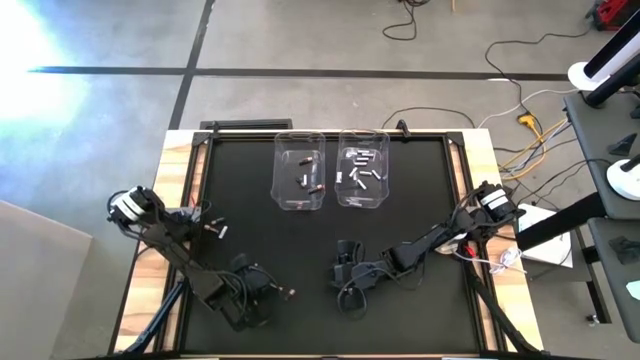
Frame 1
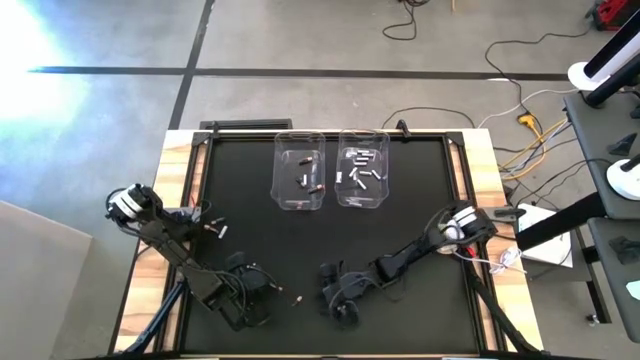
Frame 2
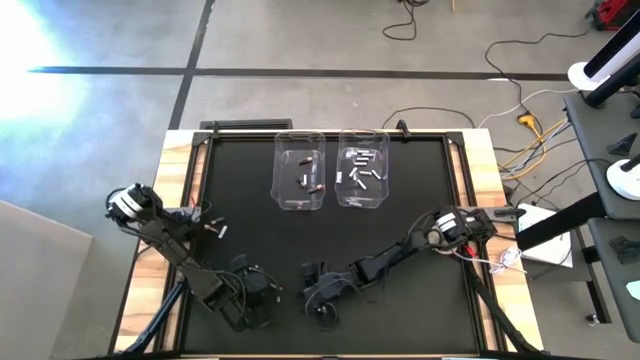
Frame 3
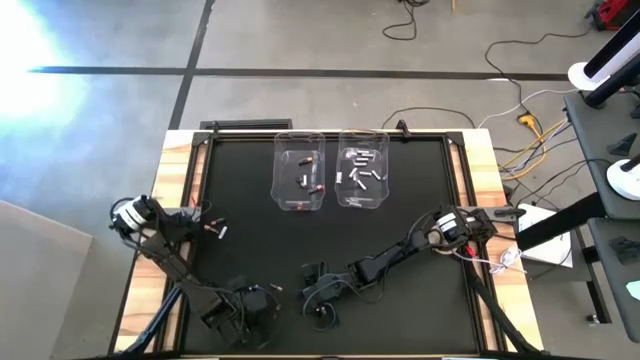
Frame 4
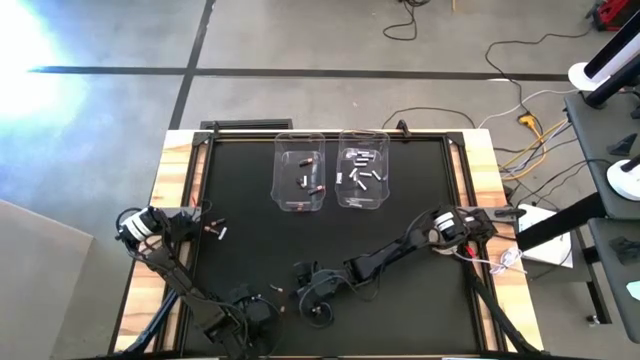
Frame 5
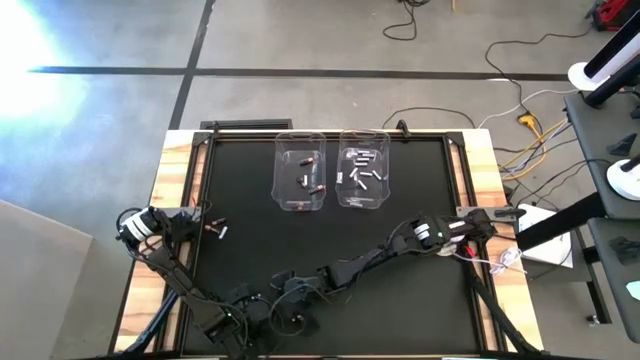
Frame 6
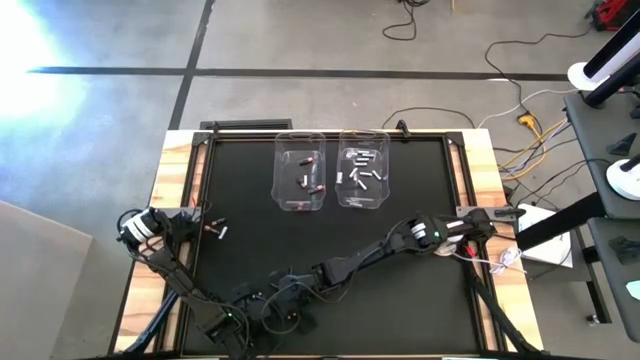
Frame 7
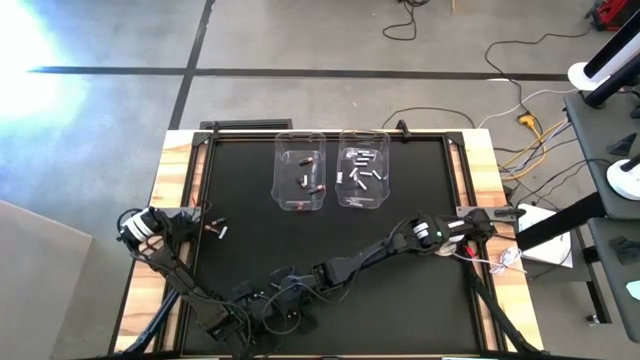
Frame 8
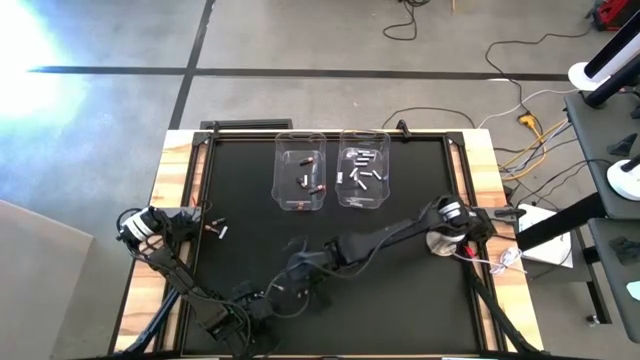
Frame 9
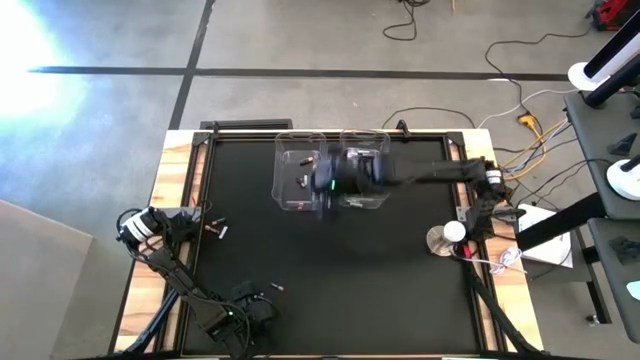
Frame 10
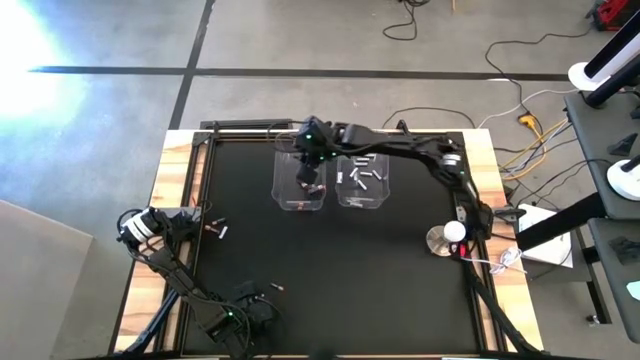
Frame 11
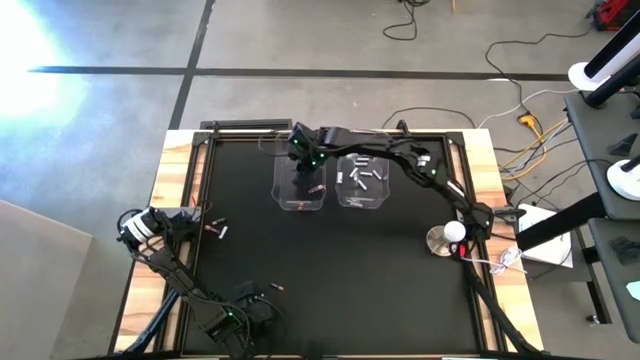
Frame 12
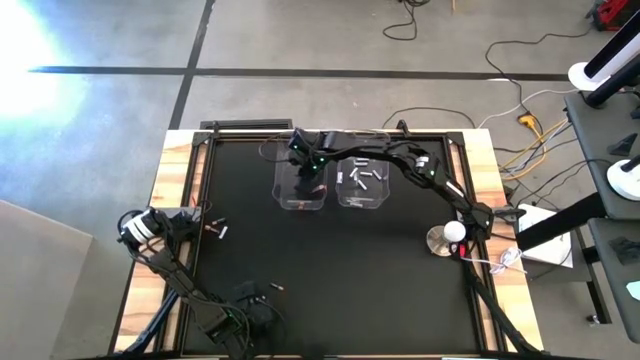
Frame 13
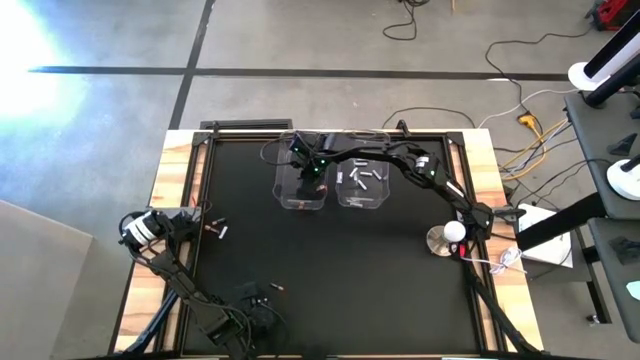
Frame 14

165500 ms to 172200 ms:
Task: Sort batteries
Put the black battery into the left transparent bin

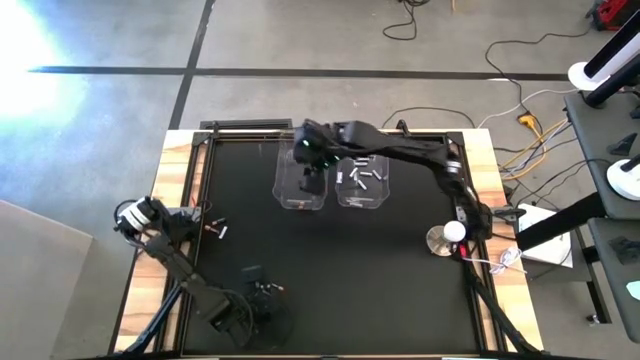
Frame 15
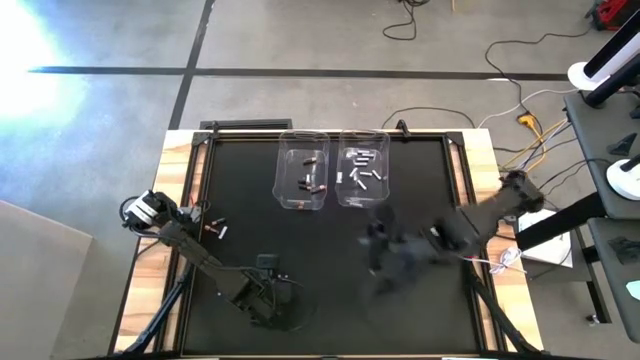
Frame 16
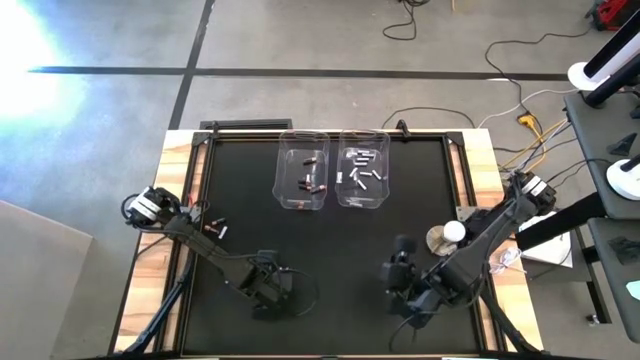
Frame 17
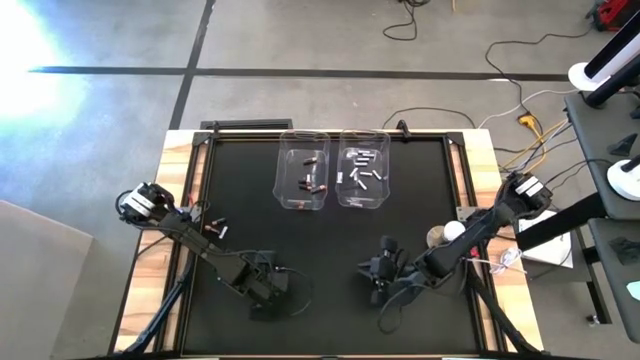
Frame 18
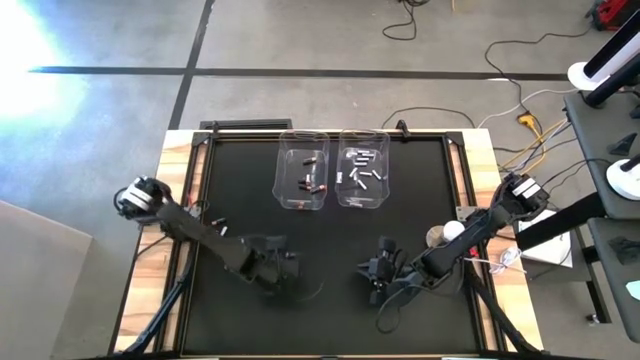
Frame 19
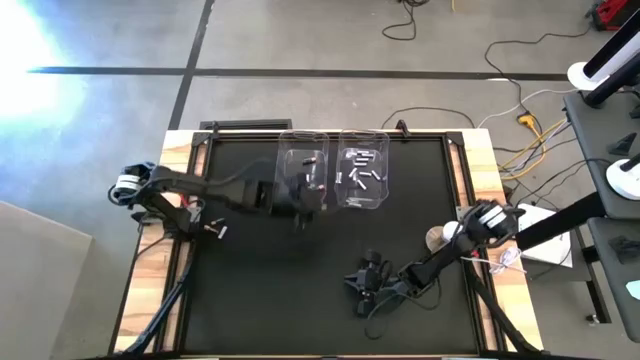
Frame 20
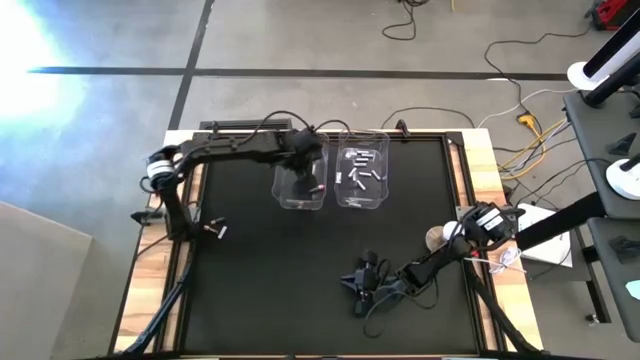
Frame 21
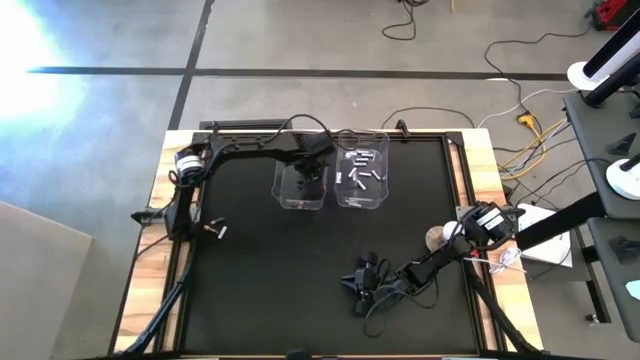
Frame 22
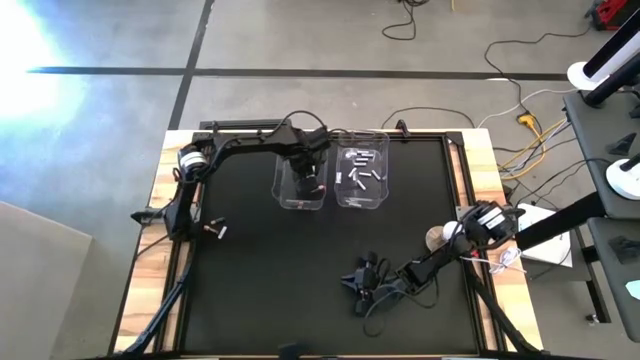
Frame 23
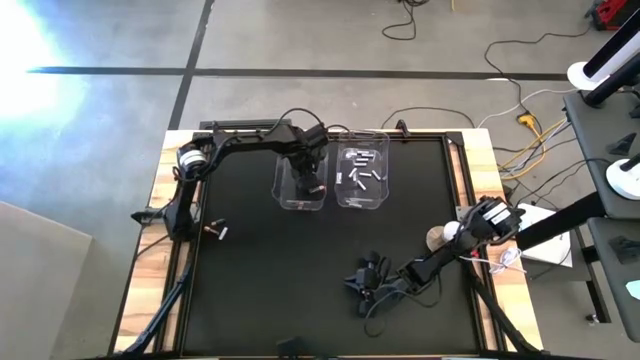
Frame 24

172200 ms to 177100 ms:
Put the black battery into the left transparent bin

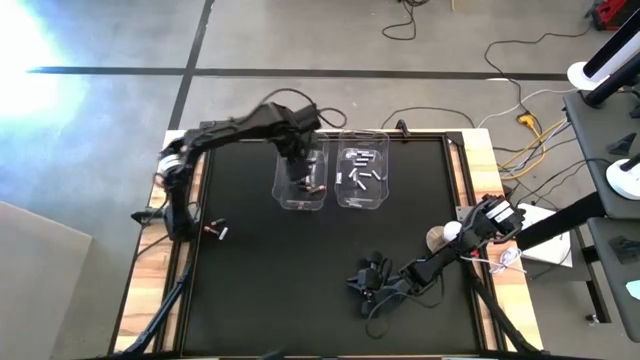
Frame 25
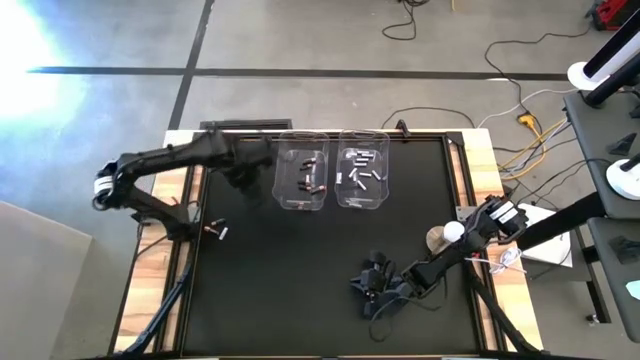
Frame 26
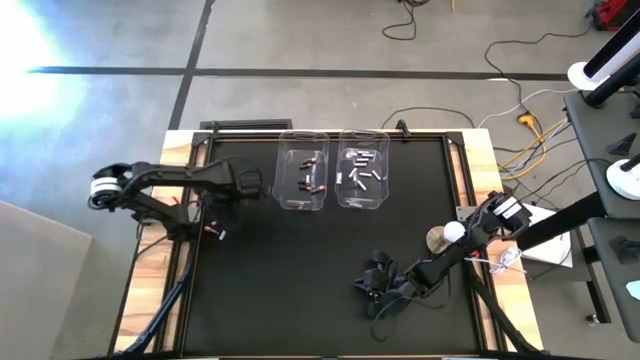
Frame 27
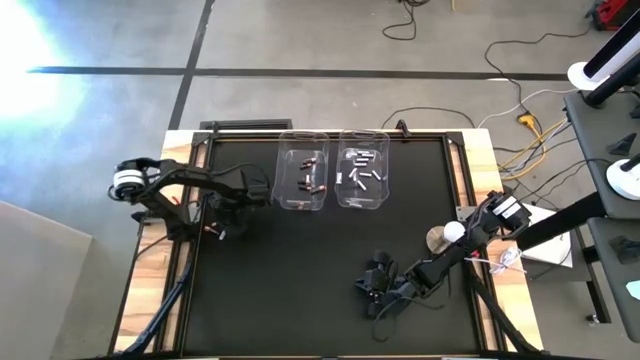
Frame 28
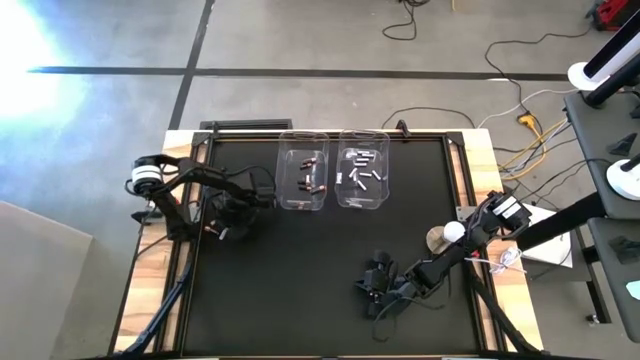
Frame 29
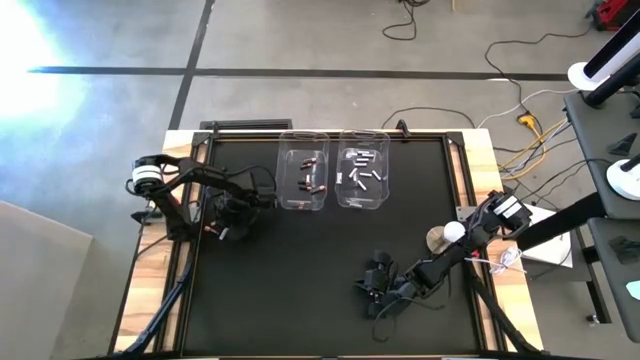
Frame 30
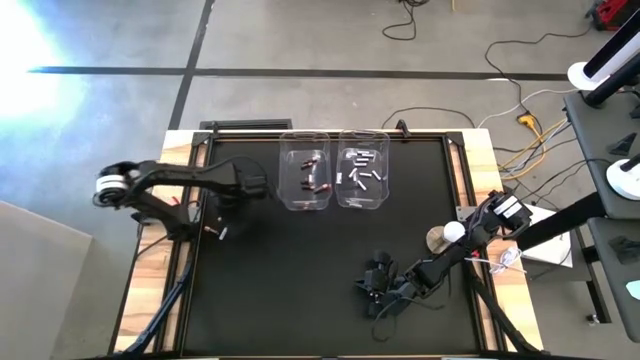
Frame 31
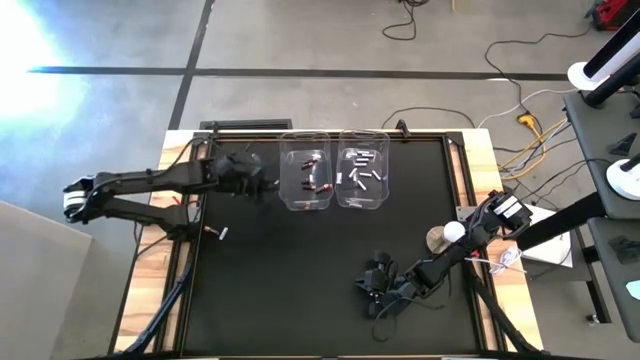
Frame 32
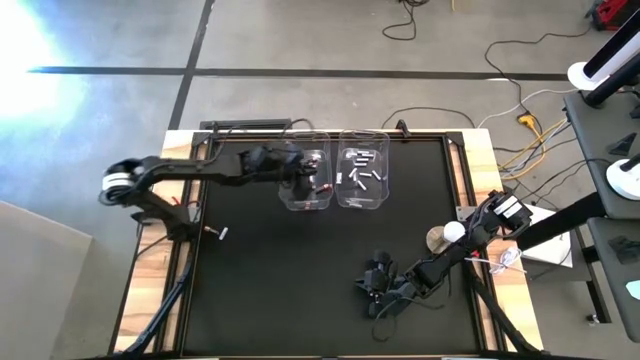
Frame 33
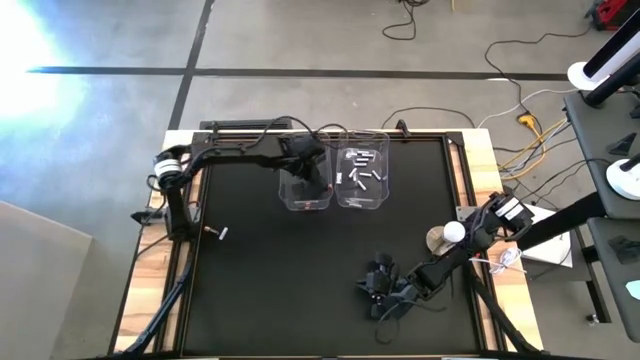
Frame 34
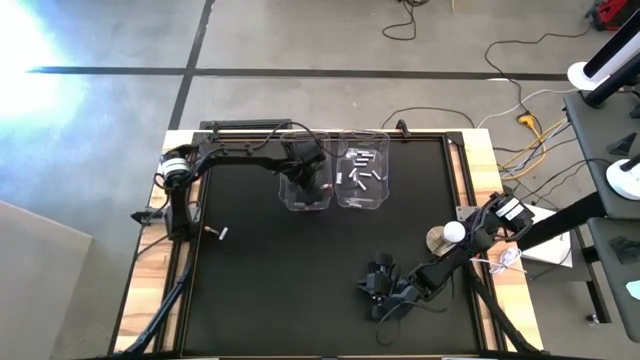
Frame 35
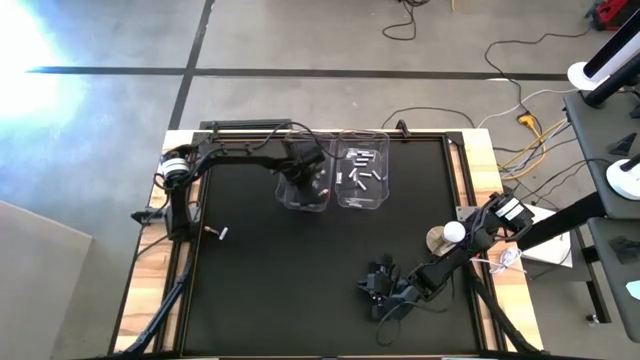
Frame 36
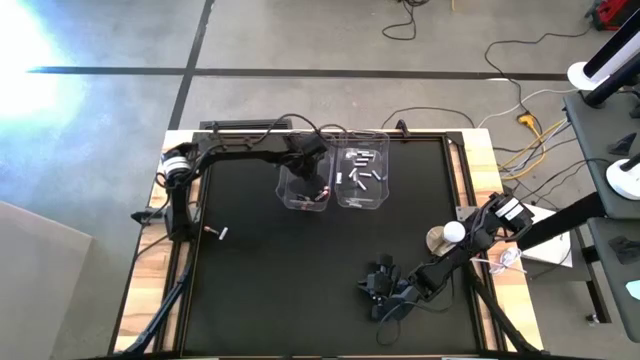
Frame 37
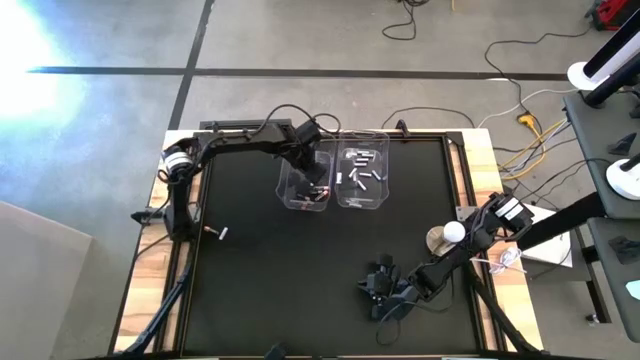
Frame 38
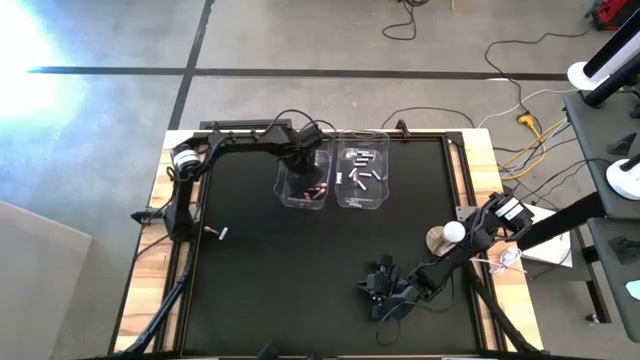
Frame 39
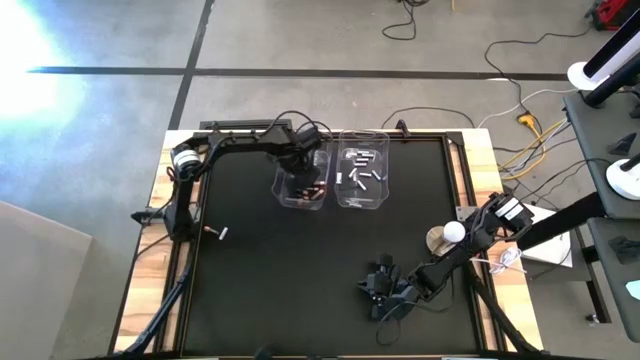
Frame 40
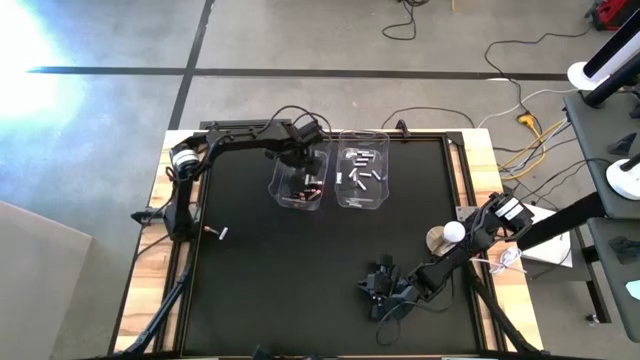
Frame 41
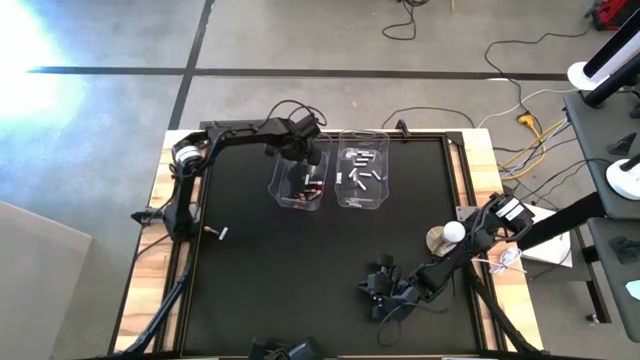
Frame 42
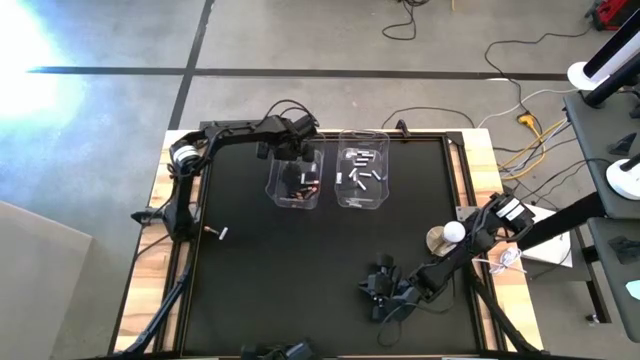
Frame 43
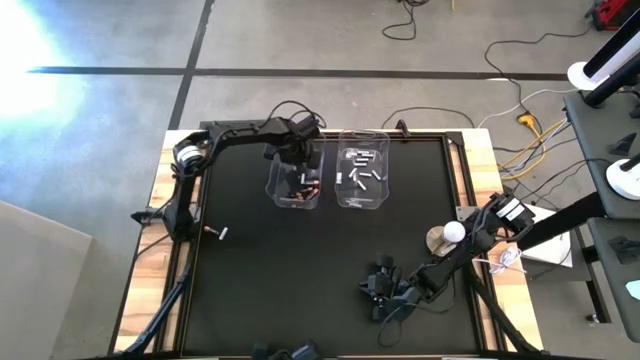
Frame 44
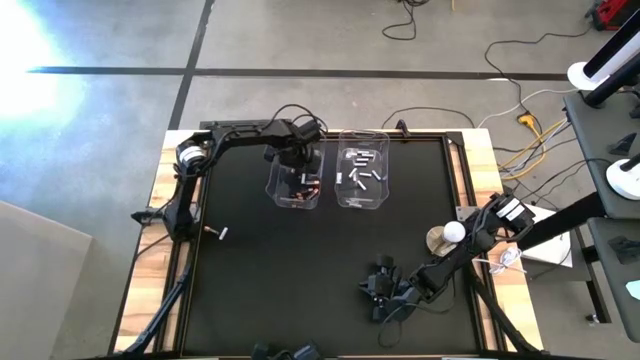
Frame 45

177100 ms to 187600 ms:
Put the black battery into the left transparent bin
